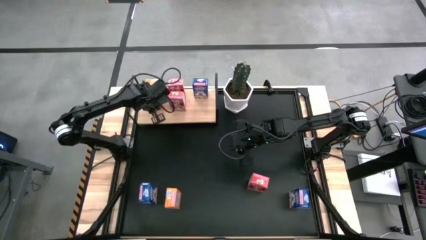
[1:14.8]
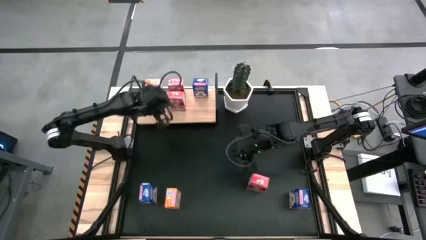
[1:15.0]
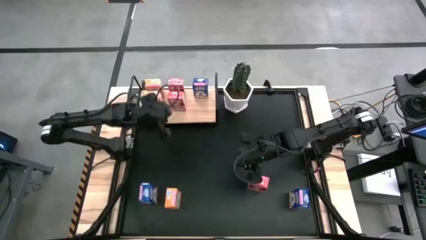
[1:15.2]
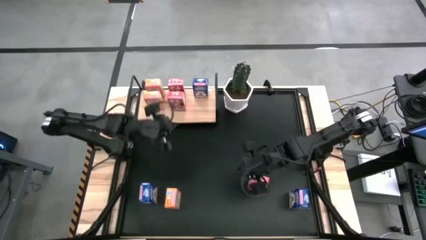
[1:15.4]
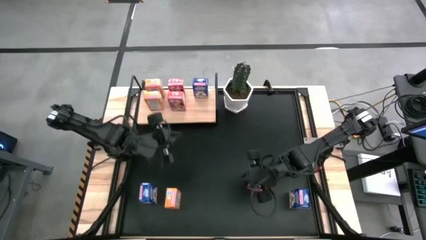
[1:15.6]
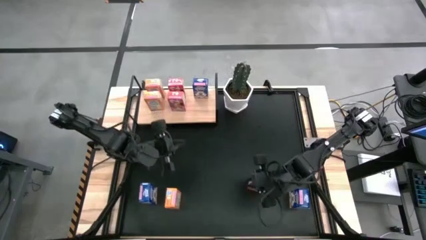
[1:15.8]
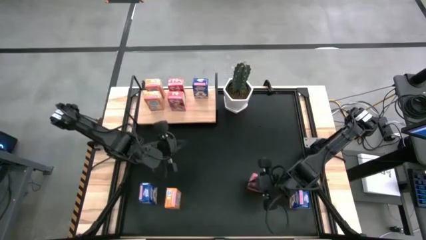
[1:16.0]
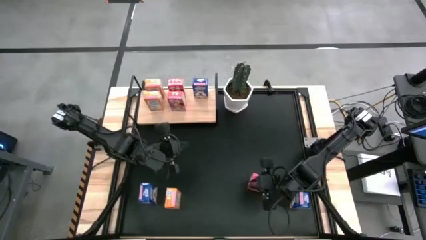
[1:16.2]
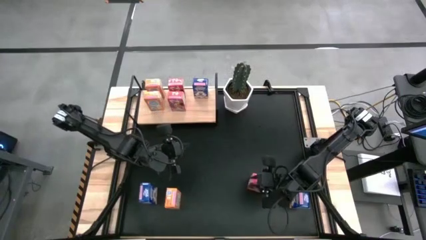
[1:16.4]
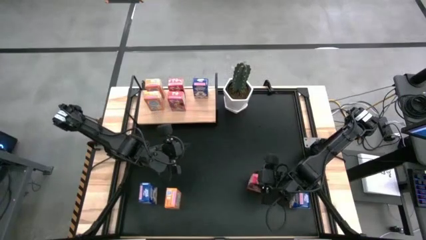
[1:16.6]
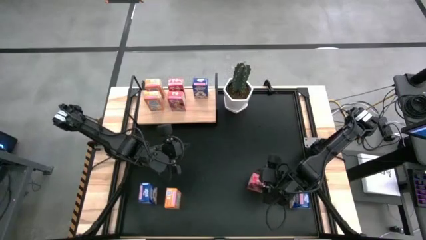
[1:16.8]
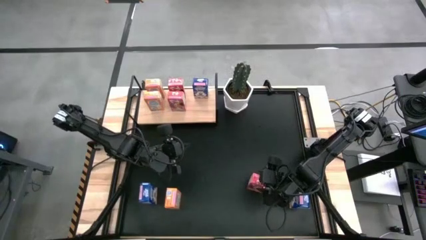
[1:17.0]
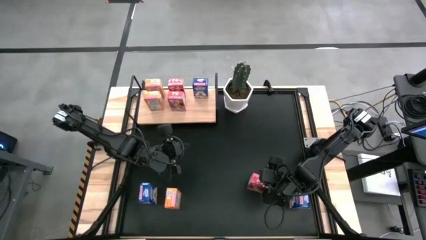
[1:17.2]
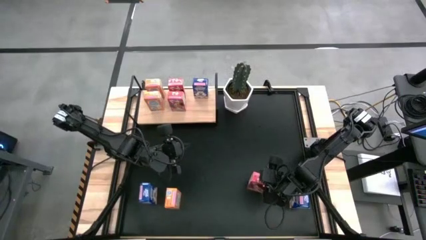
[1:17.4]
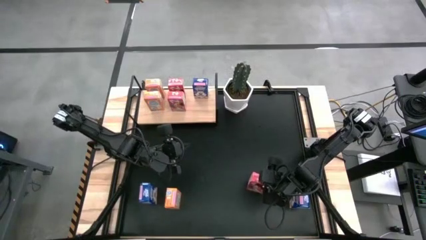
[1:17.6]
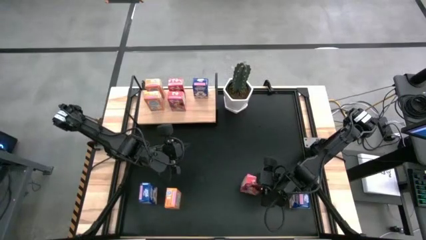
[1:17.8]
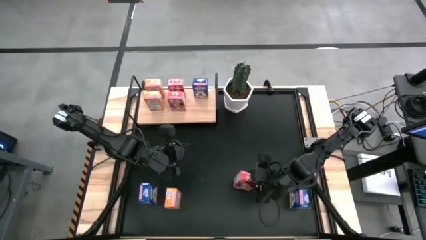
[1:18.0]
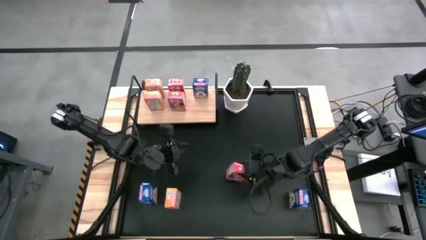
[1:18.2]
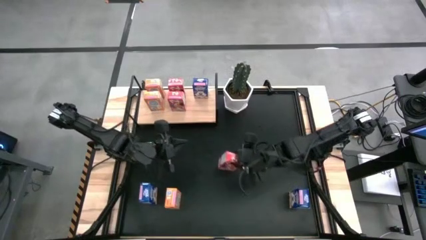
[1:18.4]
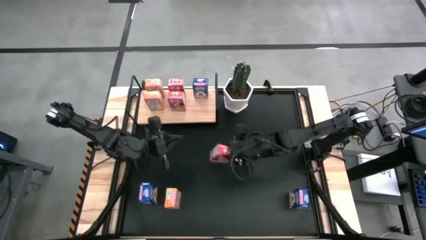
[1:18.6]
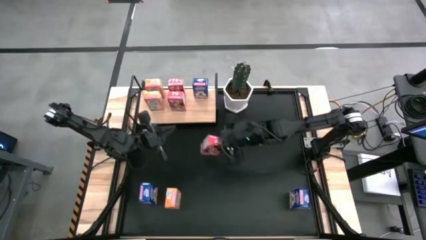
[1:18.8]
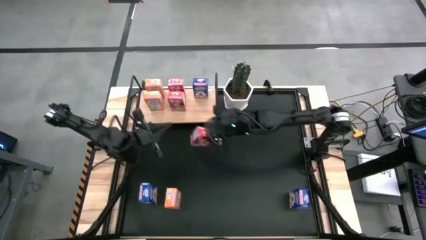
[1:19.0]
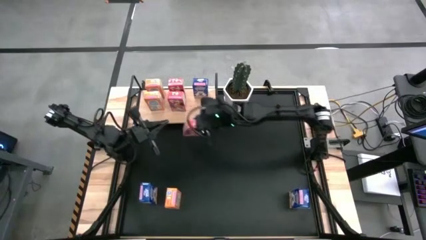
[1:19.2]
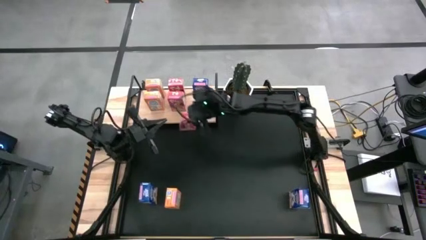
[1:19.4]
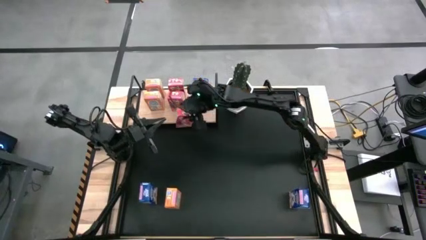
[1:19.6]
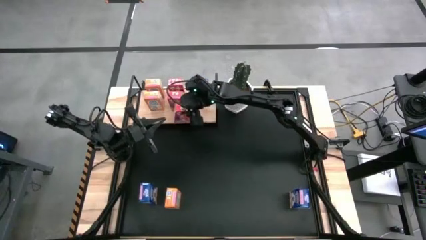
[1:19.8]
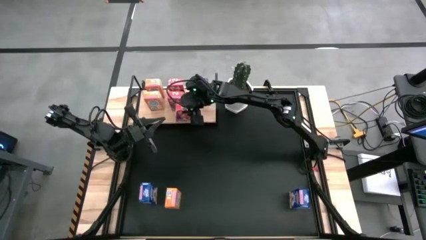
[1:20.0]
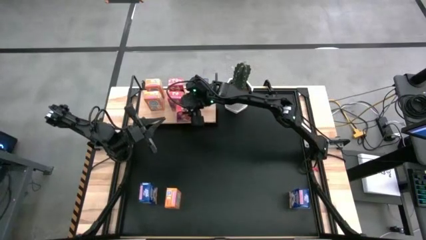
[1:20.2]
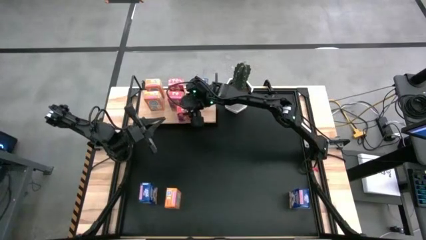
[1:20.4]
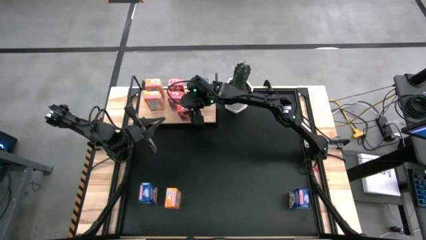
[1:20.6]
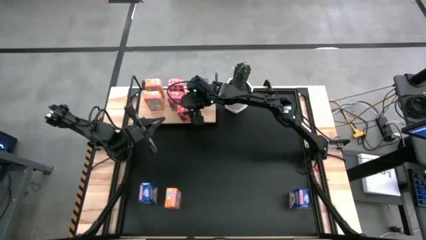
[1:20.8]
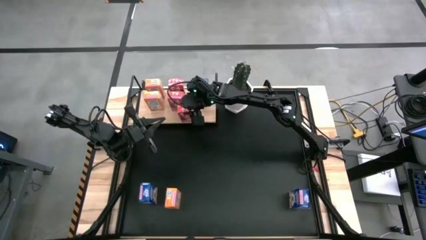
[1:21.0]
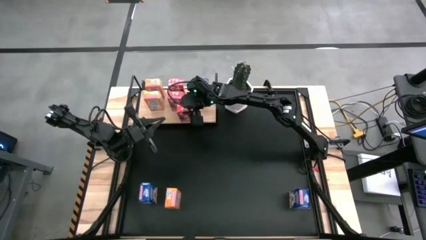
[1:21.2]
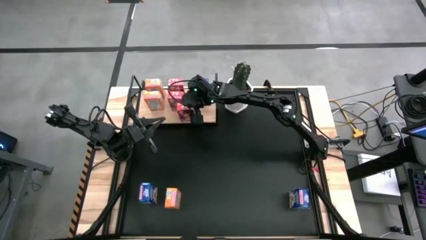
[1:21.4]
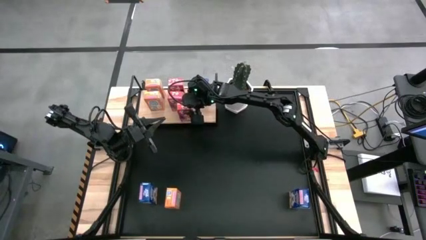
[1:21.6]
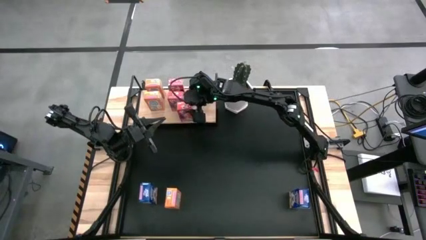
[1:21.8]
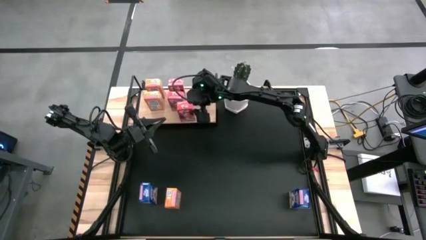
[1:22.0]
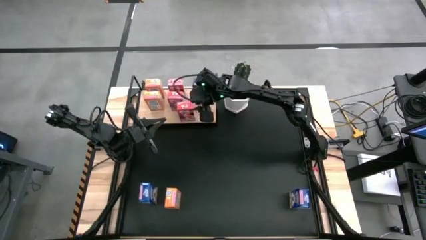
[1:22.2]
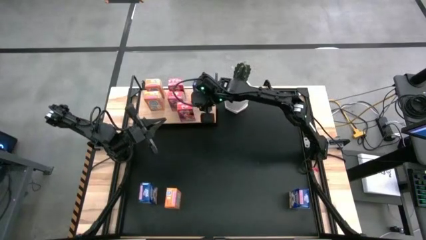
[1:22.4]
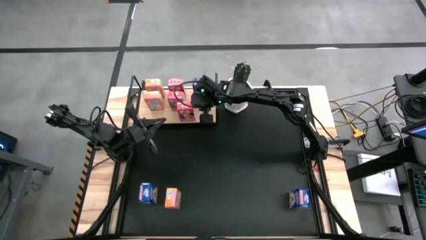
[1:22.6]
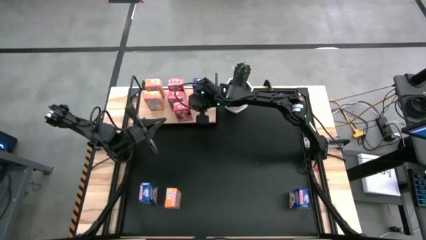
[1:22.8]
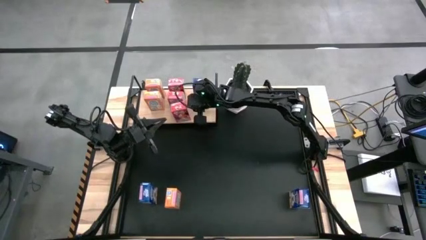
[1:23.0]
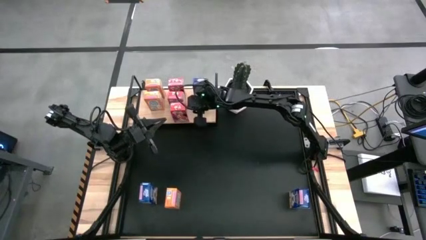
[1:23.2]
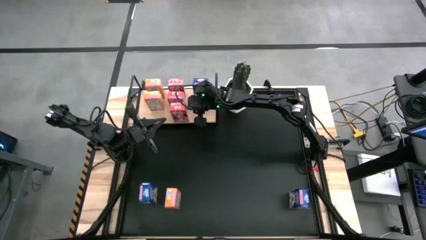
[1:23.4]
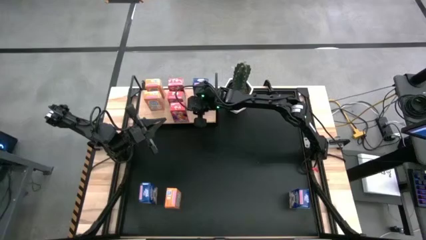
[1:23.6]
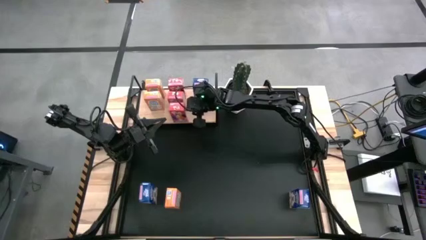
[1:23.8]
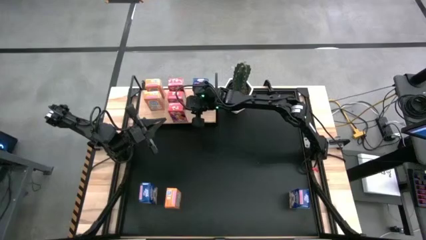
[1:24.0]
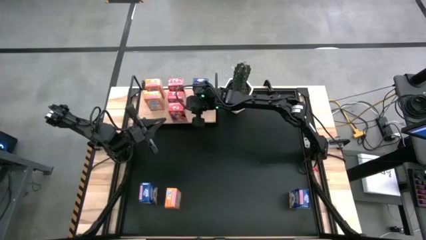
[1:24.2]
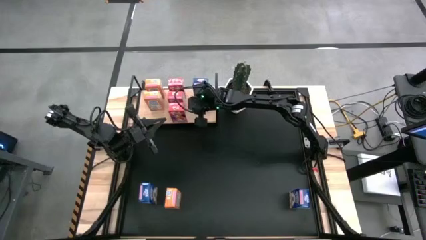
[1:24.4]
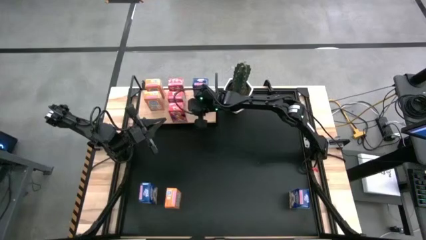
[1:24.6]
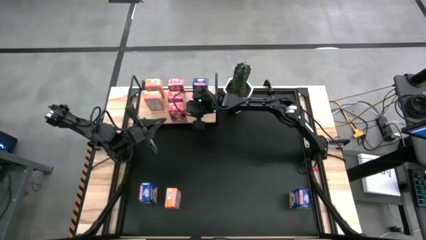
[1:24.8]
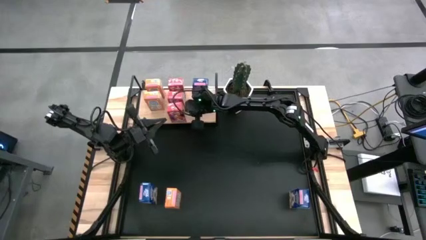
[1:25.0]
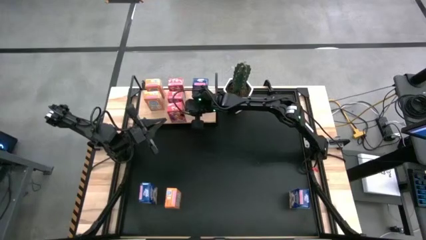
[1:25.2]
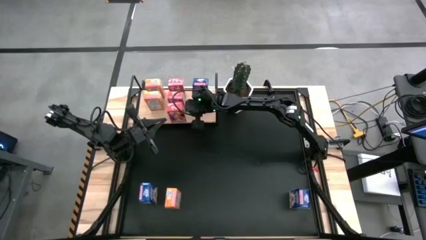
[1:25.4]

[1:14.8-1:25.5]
Task: Stack cereal on shelf
Put the red cereal box on the shelf and align it with the other red cereal boxes

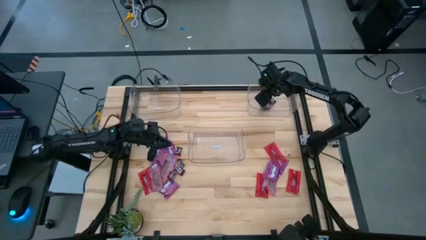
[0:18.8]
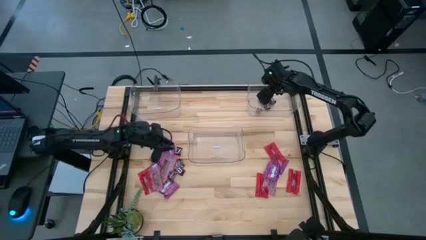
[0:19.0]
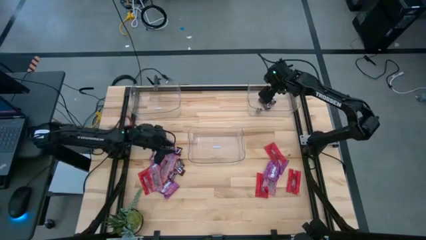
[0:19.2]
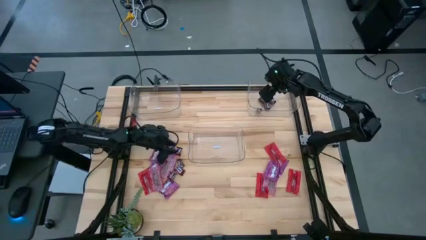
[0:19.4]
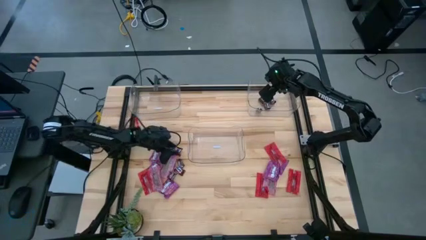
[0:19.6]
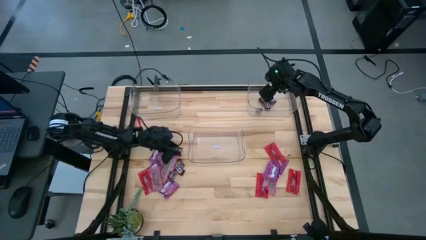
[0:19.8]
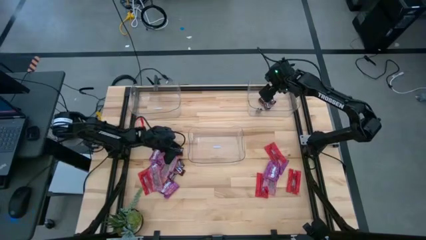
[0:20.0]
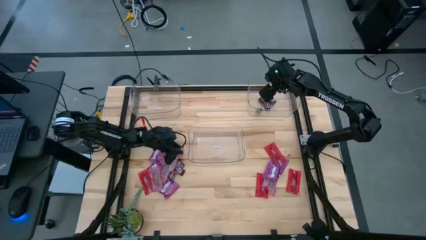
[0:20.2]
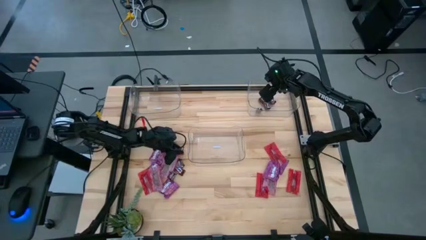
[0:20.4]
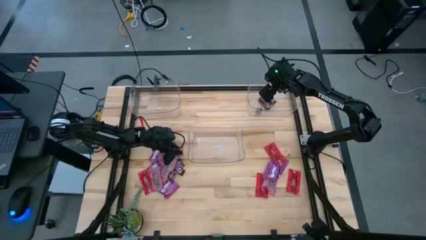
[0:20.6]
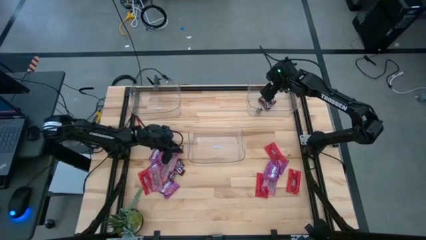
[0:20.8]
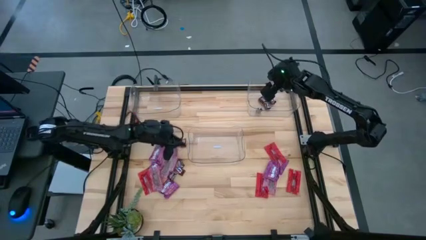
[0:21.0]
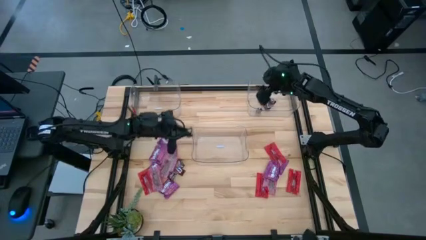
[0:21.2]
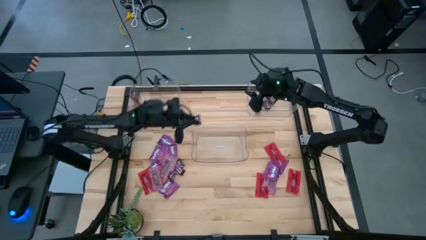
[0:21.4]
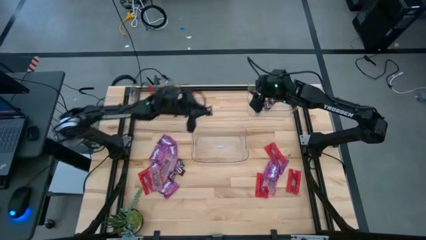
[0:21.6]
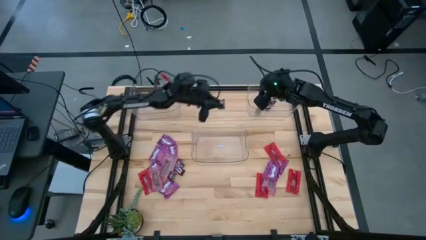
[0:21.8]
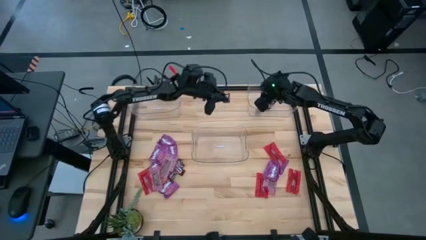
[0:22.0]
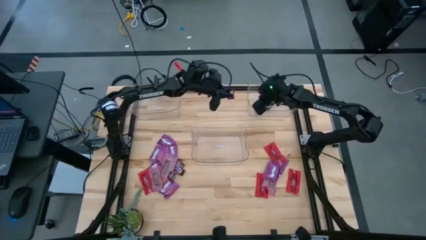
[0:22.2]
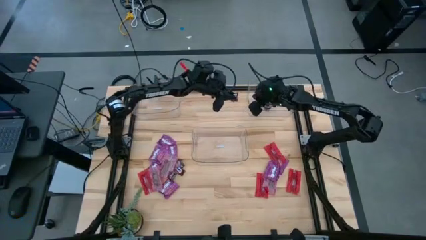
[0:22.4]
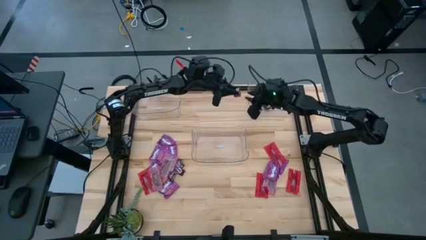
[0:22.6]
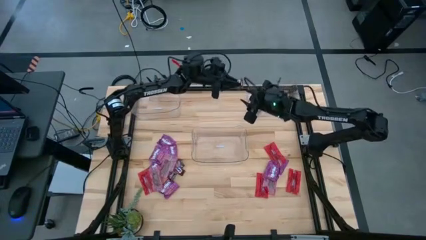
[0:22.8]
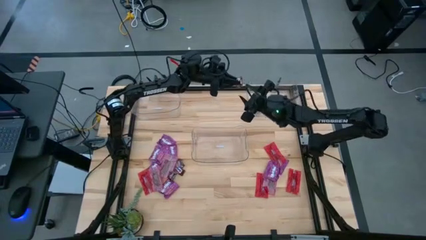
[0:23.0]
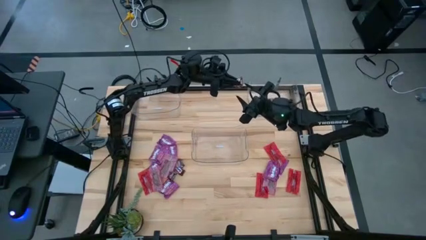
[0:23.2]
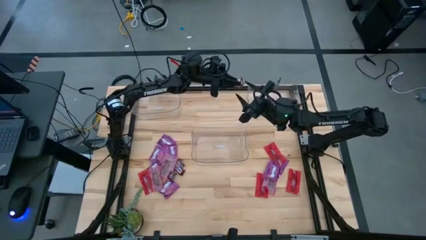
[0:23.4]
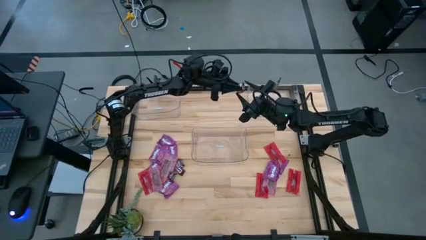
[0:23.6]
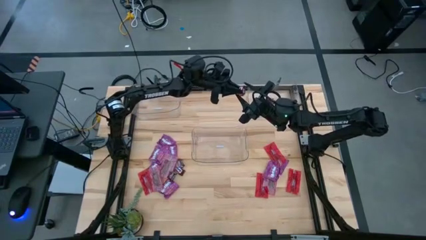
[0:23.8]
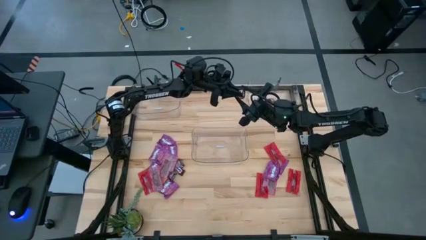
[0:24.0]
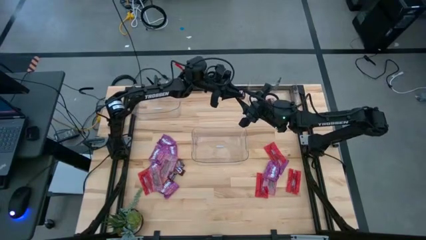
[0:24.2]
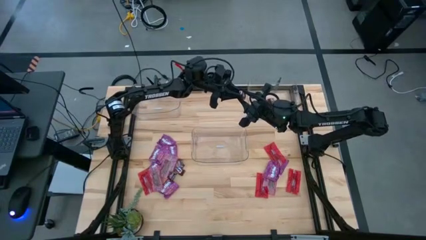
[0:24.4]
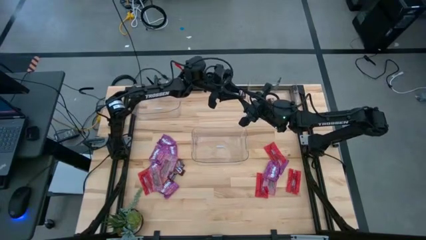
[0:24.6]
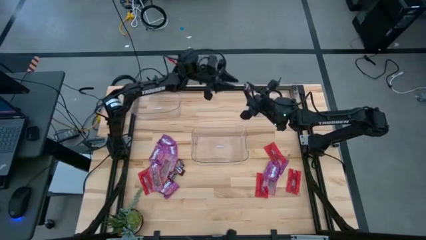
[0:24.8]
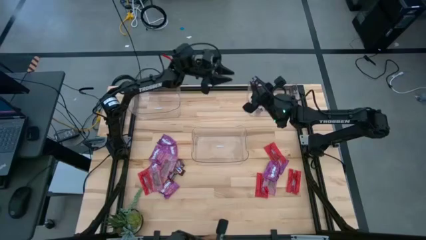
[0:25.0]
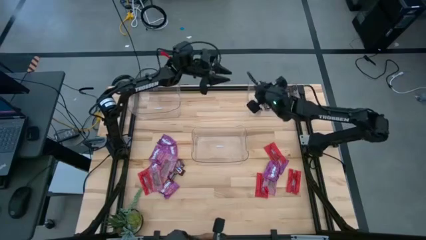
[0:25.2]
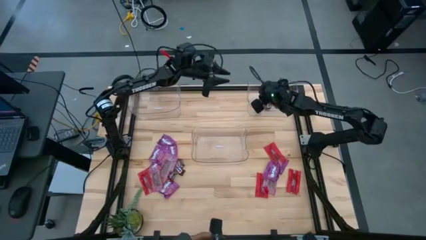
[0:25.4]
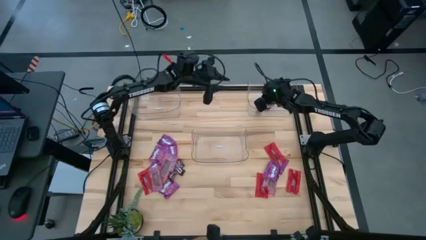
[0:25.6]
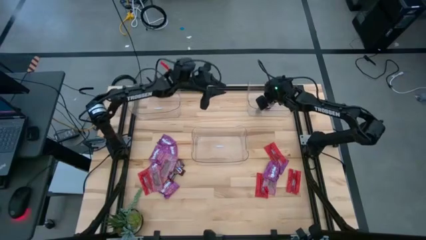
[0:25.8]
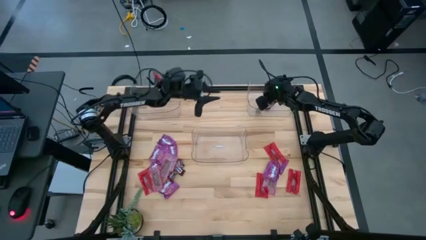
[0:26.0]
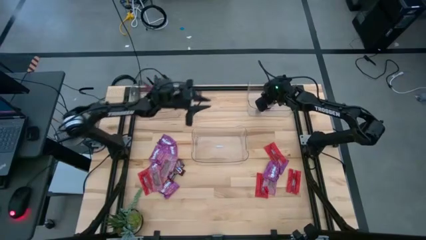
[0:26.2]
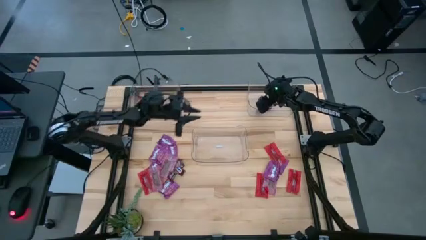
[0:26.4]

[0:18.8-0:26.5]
Task: Sort candy
Put the brown chocolate bar into the top right transparent bin
